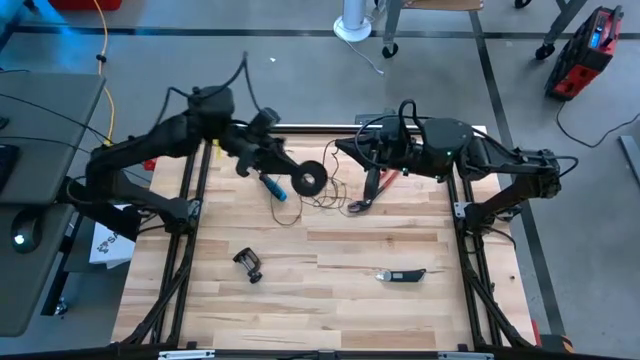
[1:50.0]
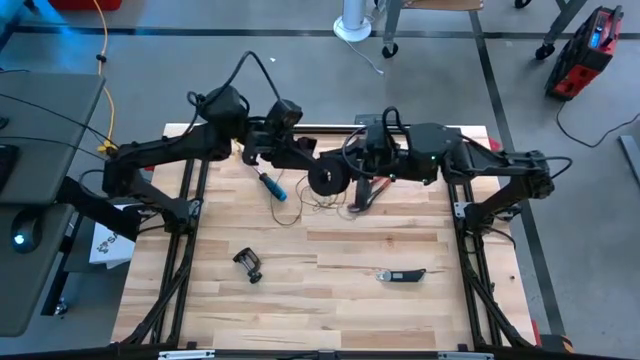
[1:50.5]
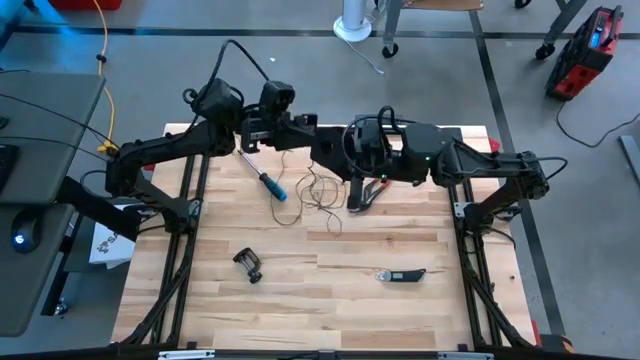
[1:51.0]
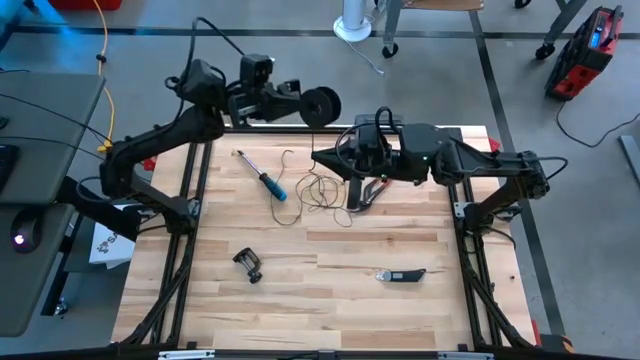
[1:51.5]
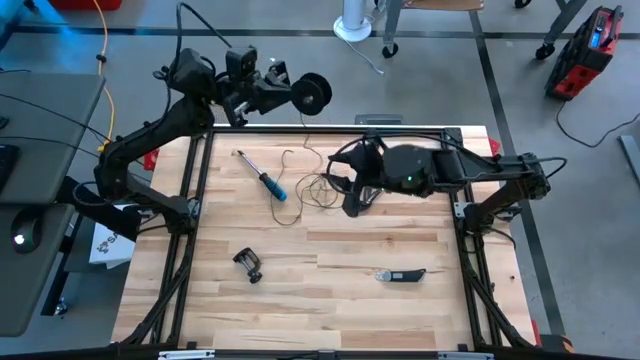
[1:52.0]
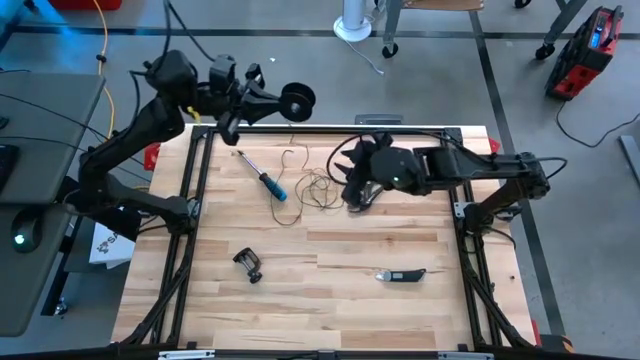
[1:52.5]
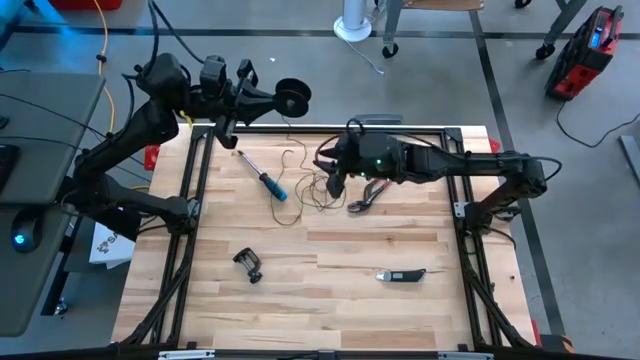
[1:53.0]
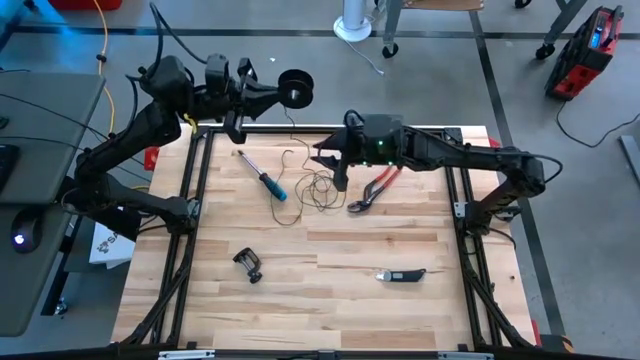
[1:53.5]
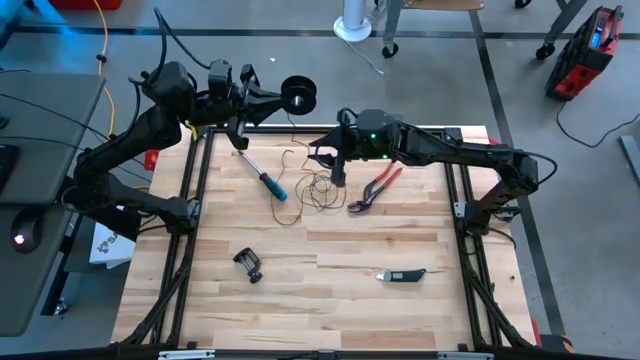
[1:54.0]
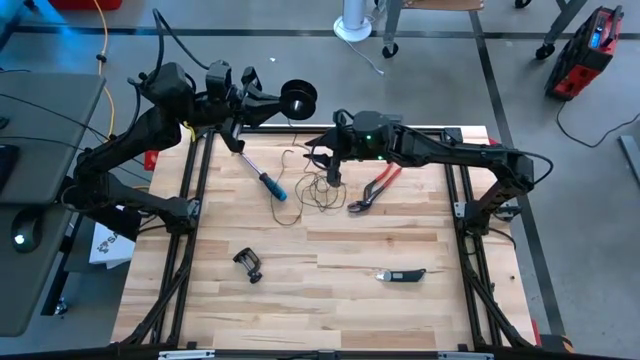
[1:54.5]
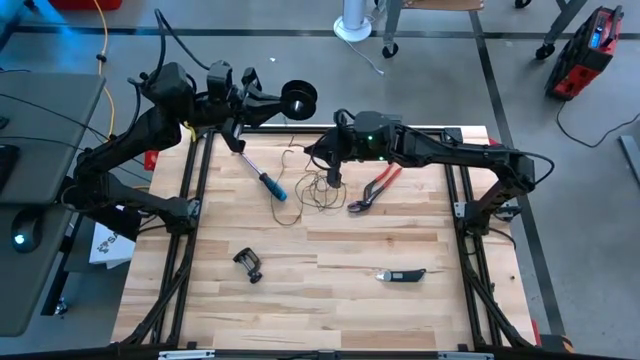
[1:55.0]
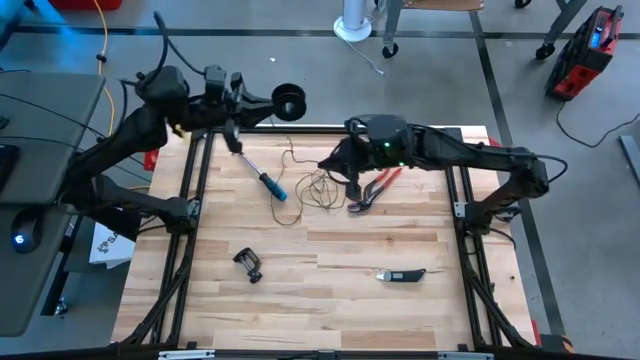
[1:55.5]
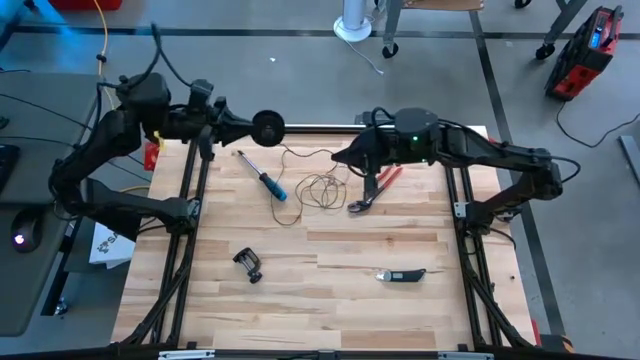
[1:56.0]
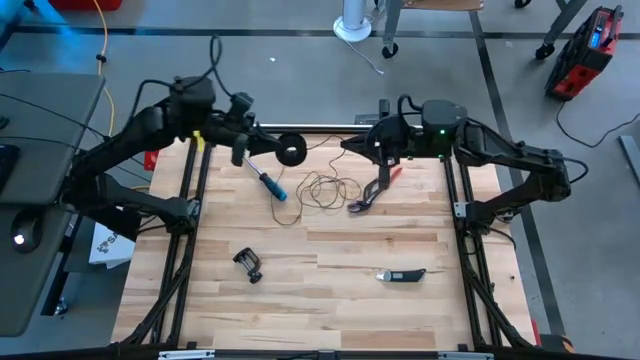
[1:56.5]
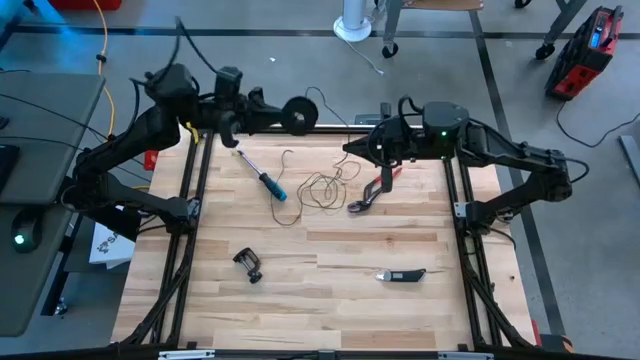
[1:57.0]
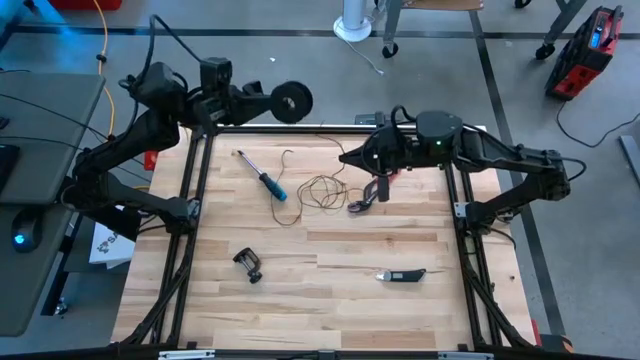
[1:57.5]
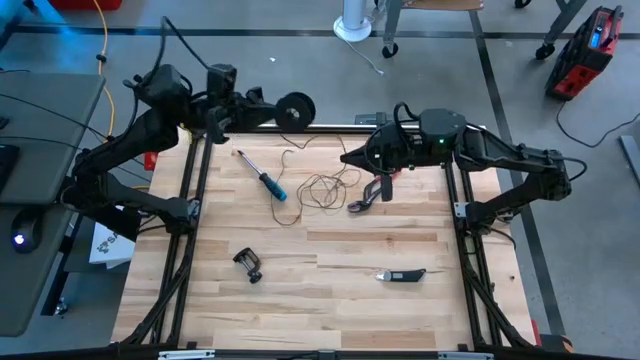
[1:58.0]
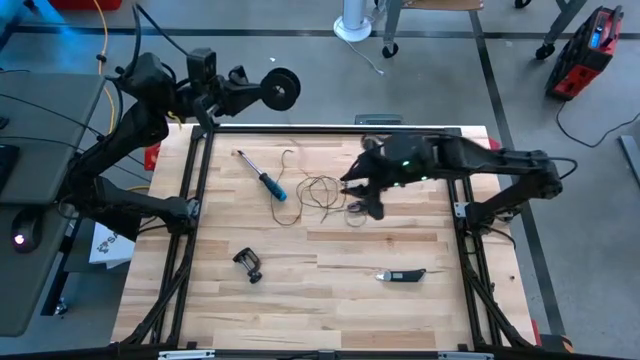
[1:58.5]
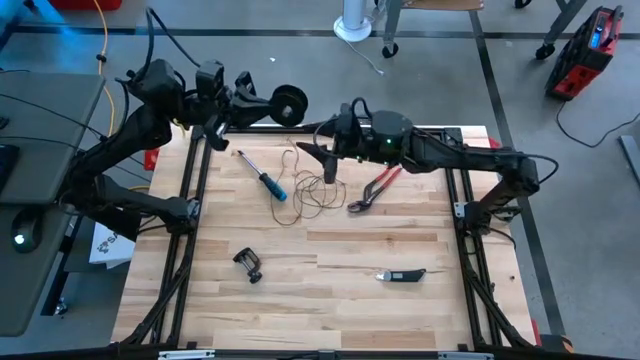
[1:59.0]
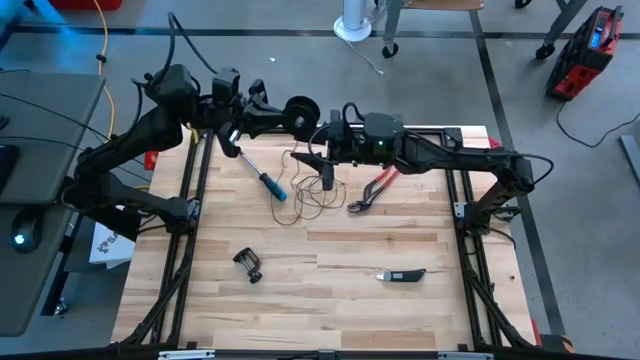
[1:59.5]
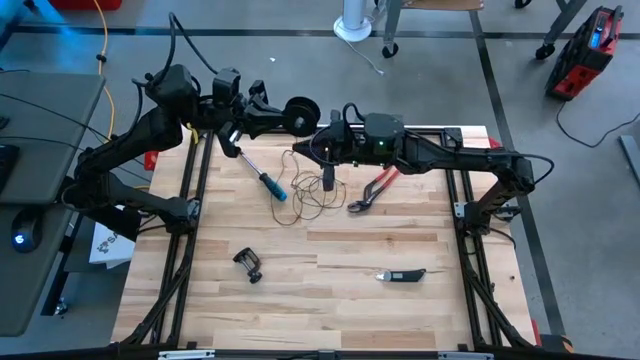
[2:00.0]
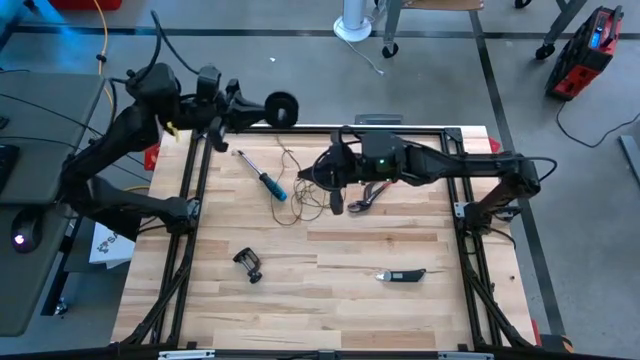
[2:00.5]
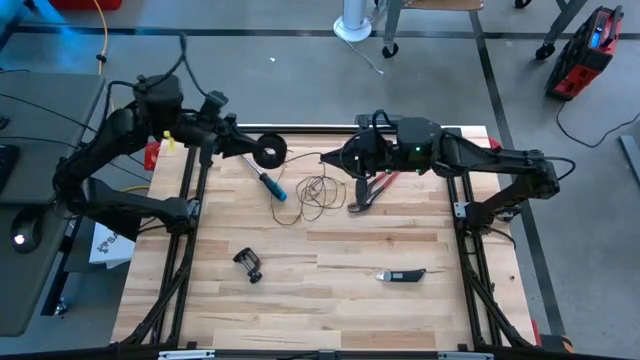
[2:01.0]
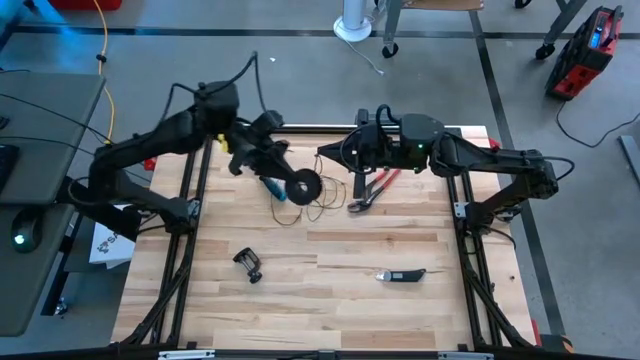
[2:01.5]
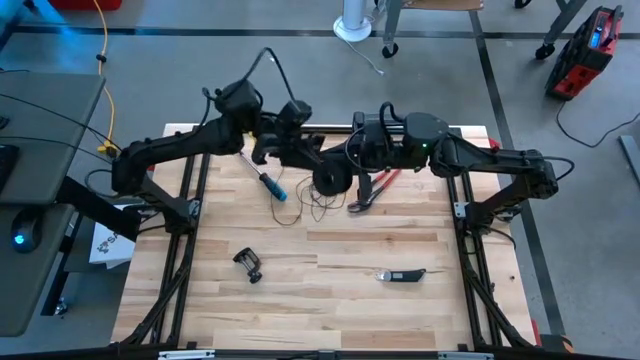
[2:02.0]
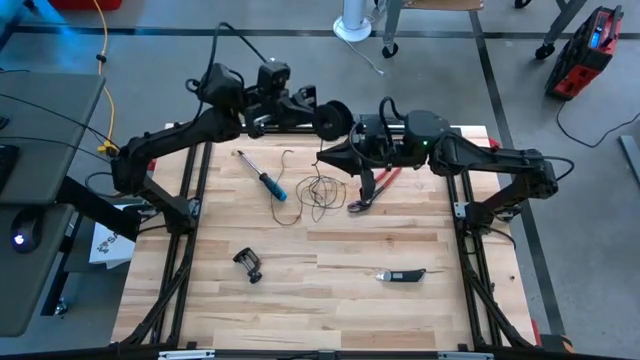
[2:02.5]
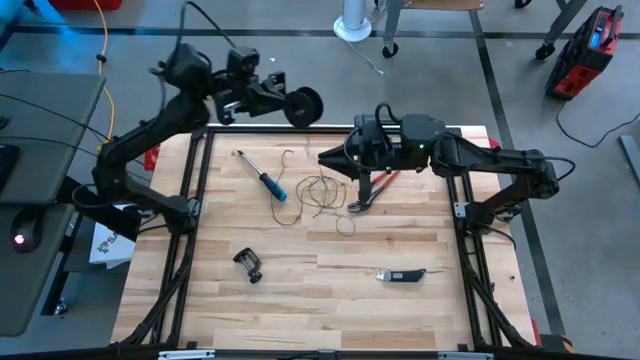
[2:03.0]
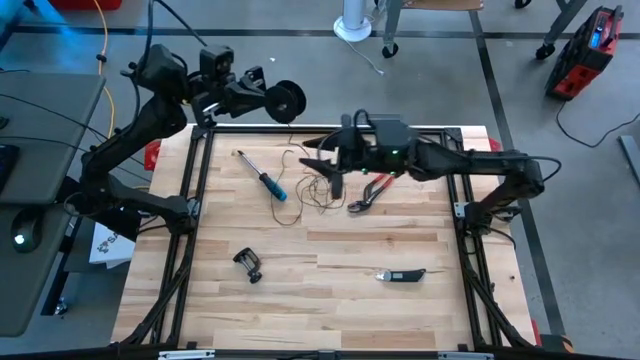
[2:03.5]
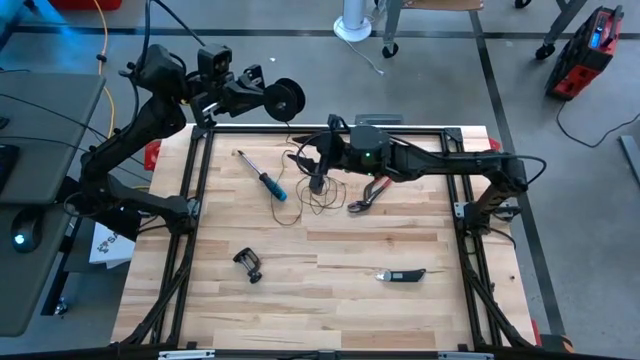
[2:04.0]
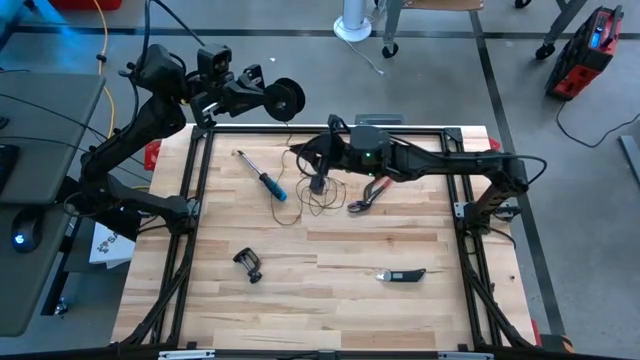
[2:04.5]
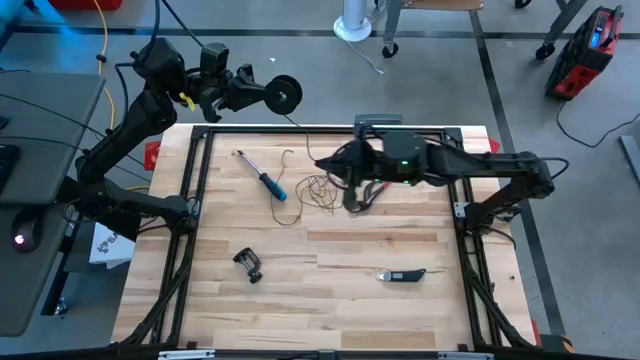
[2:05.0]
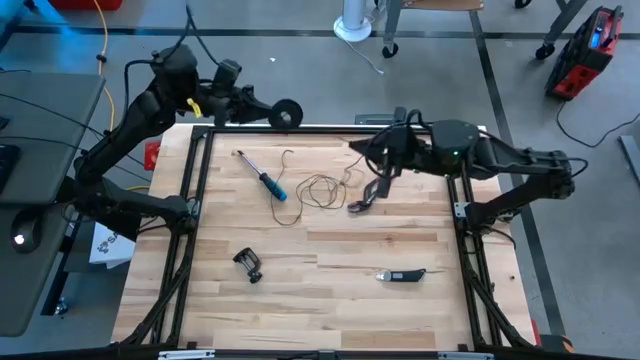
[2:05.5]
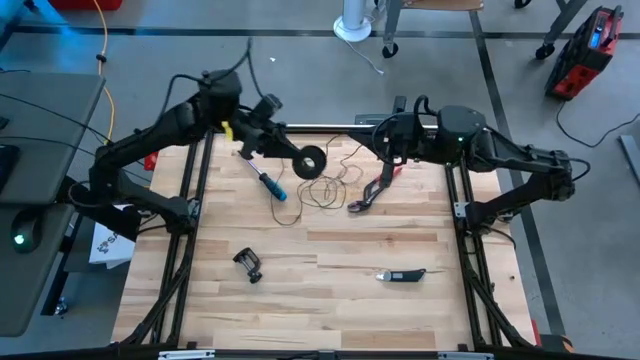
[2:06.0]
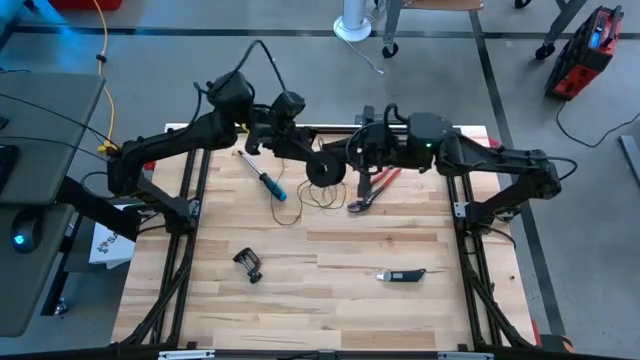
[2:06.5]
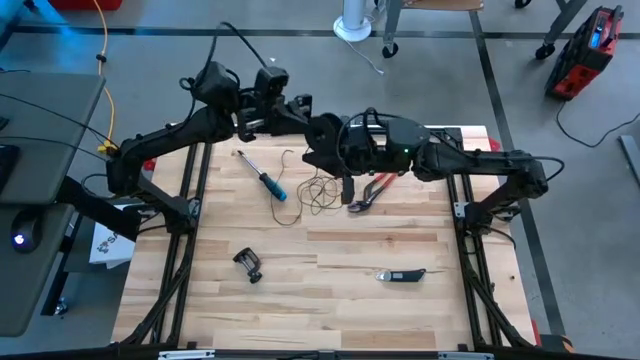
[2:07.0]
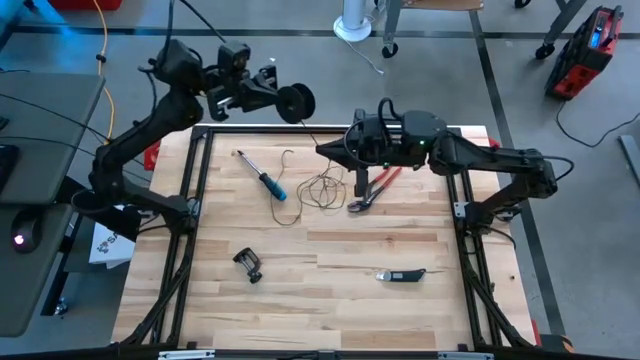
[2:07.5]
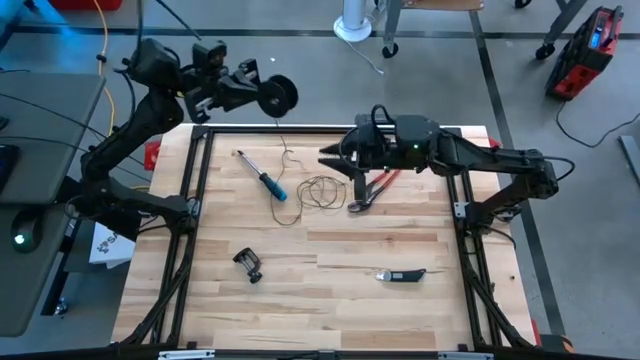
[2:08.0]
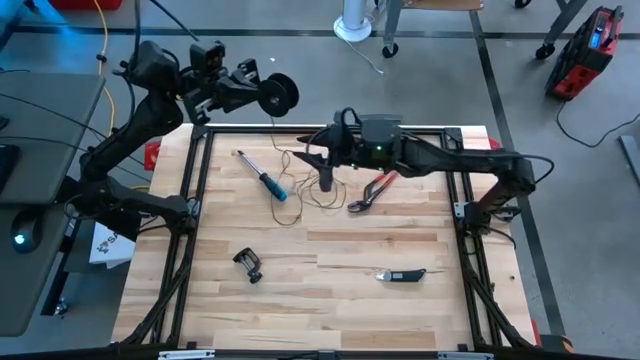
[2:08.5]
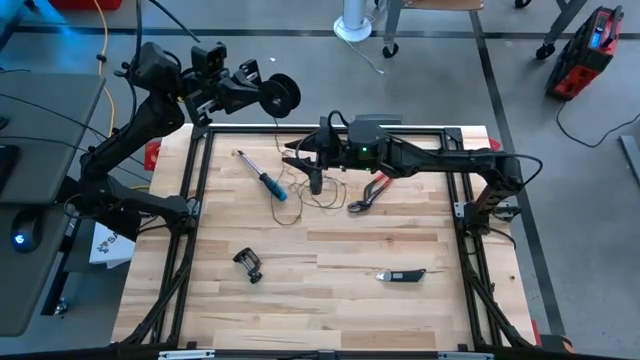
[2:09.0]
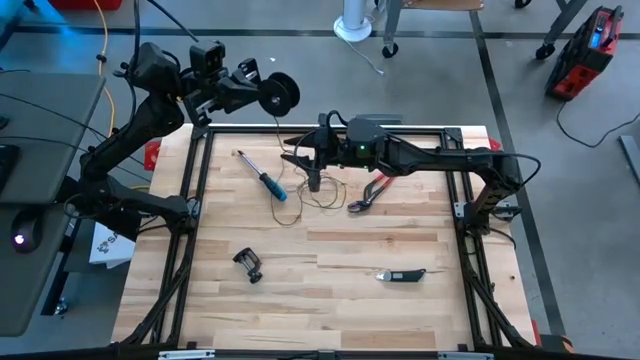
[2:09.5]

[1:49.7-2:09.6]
Task: Coil cords
Coil the black wire onto the black spool
